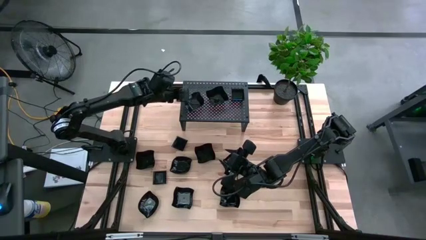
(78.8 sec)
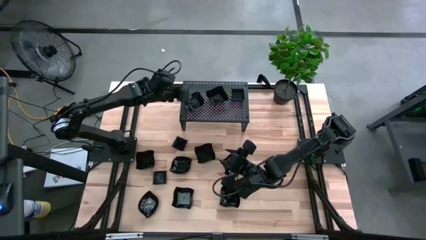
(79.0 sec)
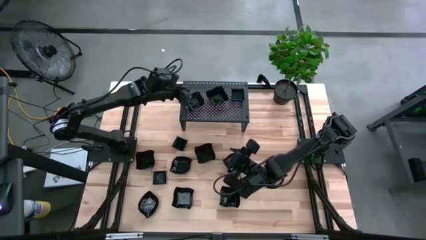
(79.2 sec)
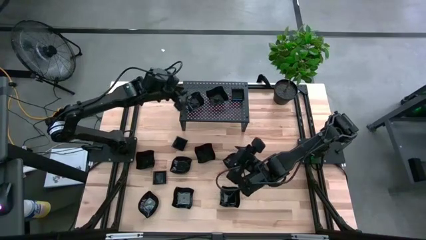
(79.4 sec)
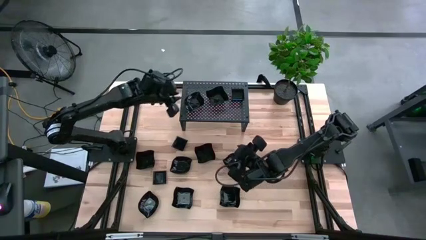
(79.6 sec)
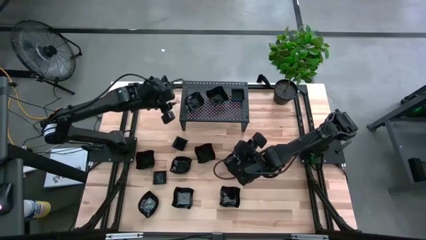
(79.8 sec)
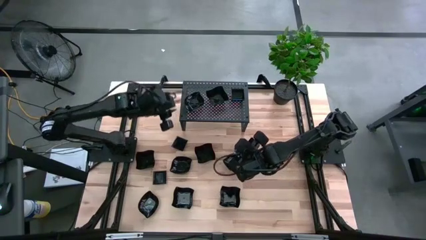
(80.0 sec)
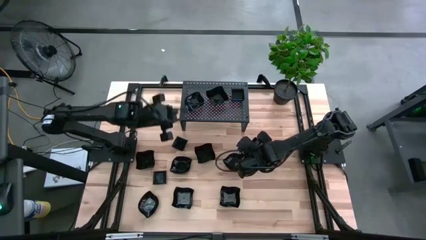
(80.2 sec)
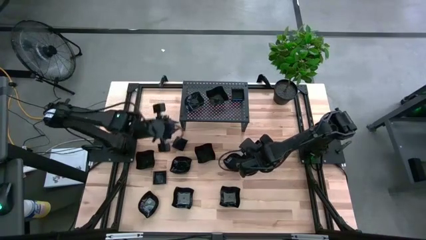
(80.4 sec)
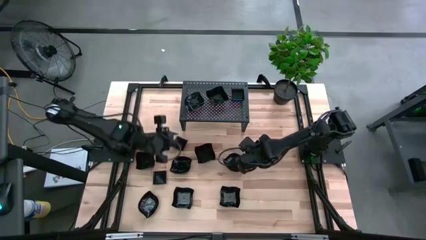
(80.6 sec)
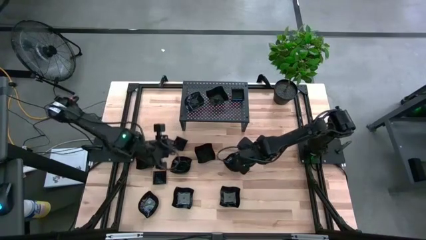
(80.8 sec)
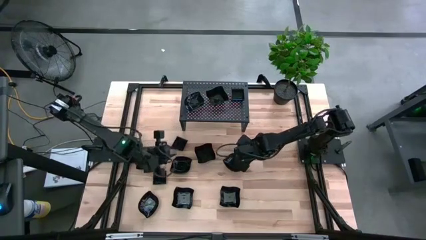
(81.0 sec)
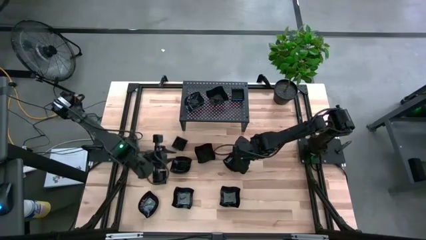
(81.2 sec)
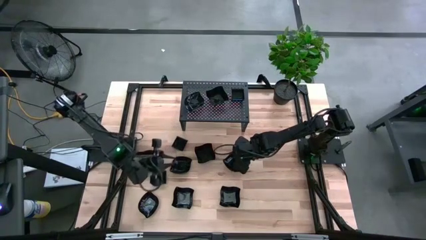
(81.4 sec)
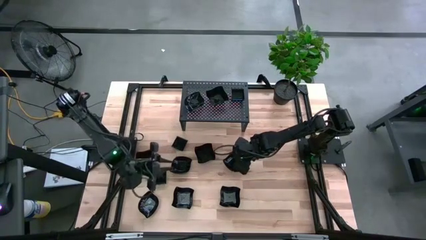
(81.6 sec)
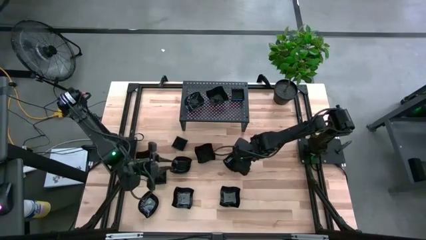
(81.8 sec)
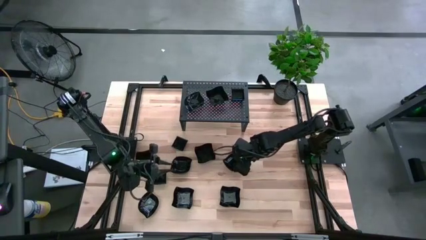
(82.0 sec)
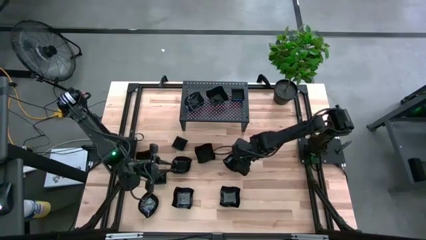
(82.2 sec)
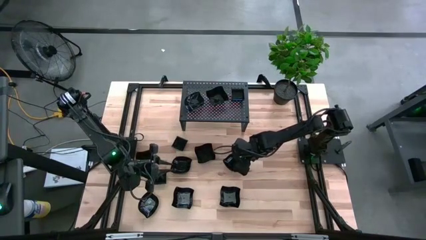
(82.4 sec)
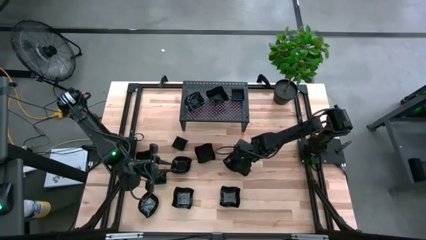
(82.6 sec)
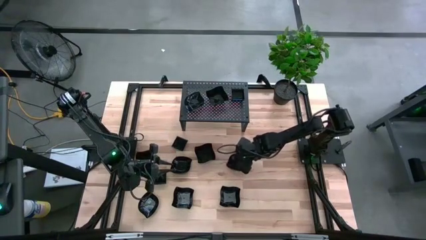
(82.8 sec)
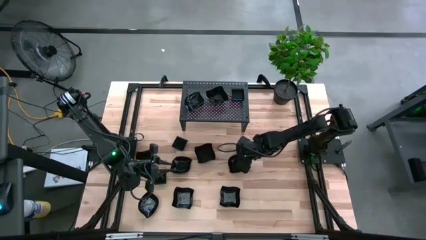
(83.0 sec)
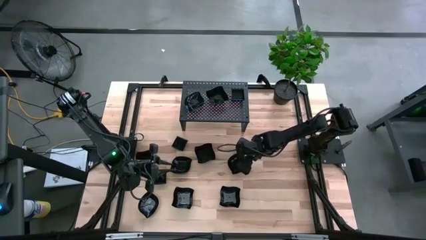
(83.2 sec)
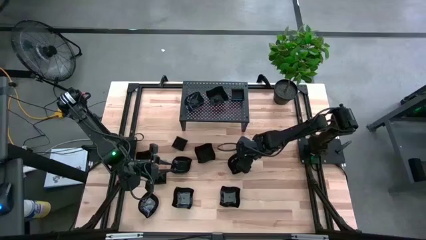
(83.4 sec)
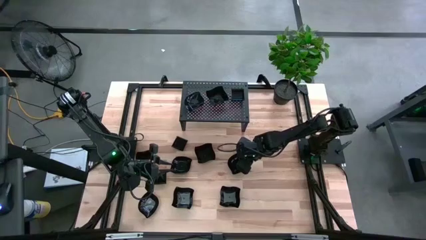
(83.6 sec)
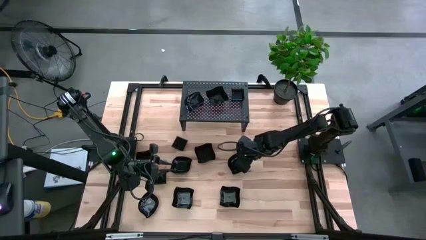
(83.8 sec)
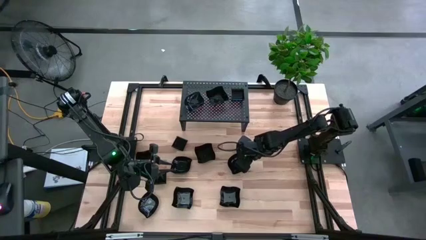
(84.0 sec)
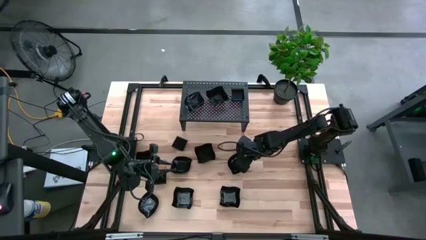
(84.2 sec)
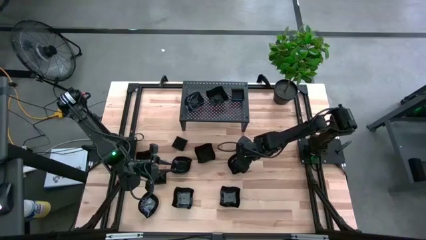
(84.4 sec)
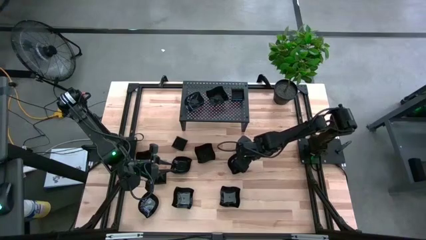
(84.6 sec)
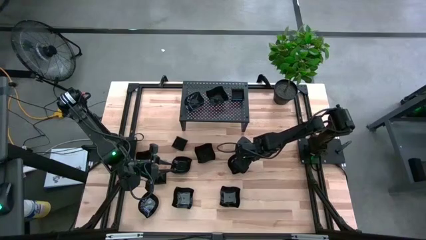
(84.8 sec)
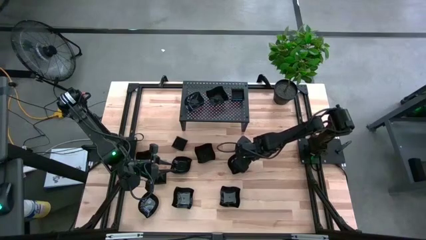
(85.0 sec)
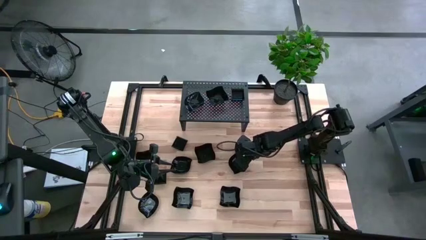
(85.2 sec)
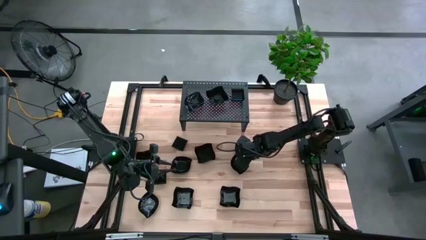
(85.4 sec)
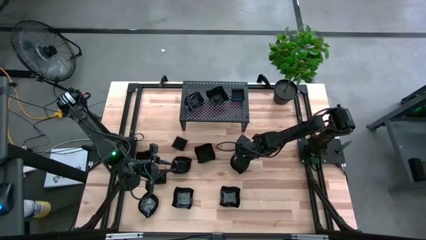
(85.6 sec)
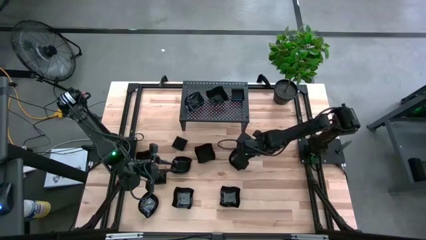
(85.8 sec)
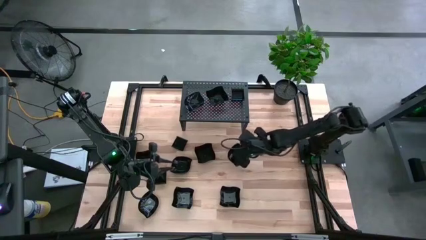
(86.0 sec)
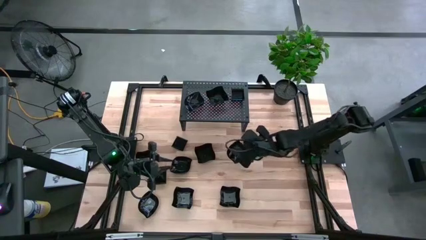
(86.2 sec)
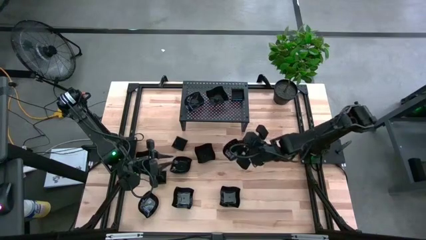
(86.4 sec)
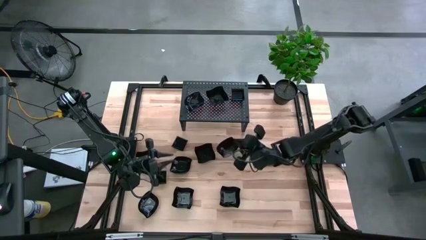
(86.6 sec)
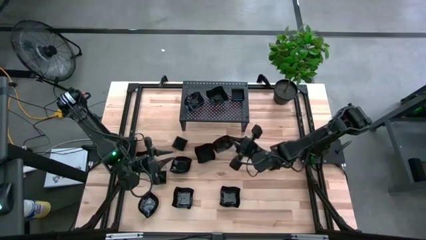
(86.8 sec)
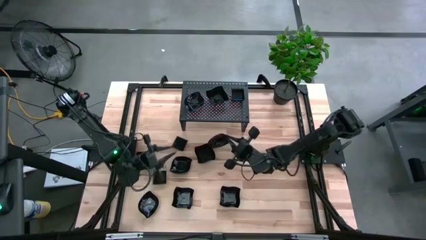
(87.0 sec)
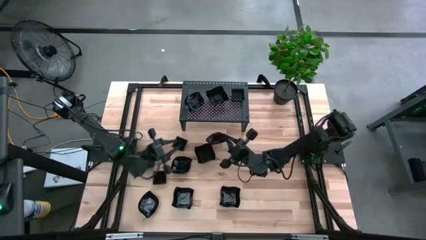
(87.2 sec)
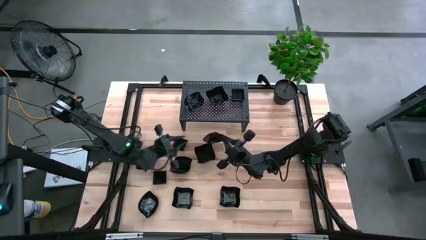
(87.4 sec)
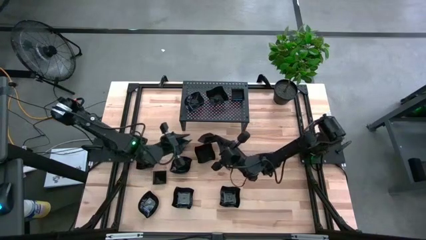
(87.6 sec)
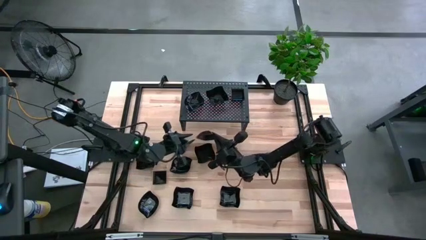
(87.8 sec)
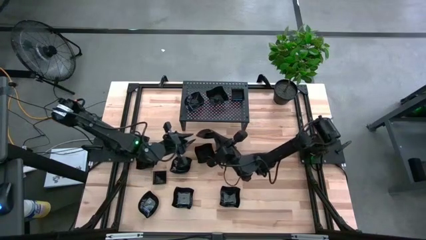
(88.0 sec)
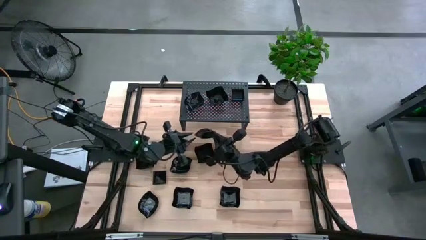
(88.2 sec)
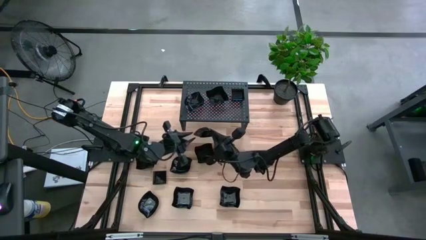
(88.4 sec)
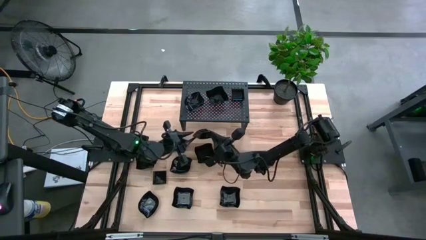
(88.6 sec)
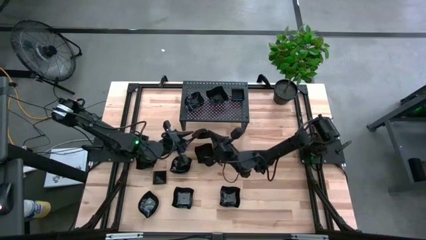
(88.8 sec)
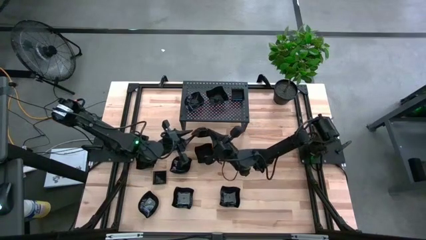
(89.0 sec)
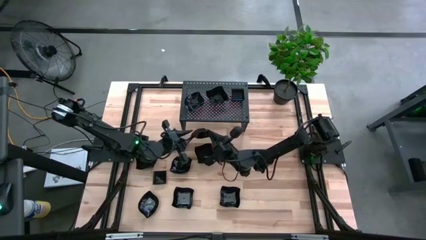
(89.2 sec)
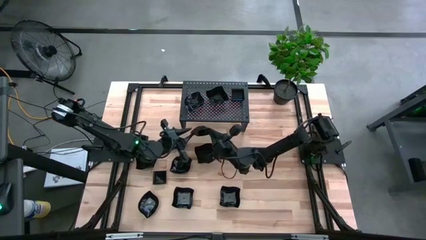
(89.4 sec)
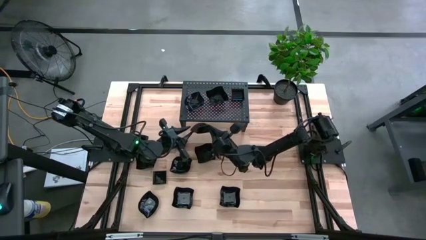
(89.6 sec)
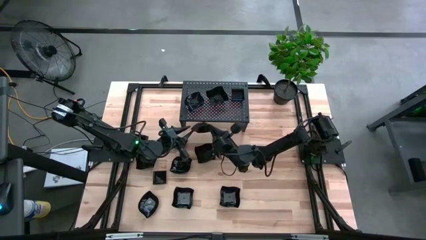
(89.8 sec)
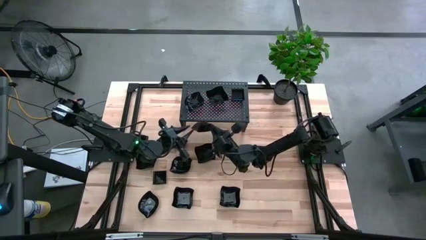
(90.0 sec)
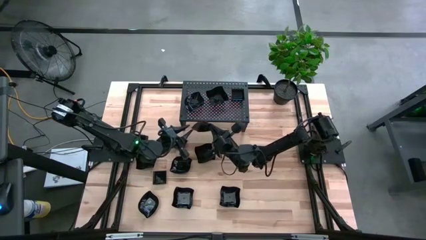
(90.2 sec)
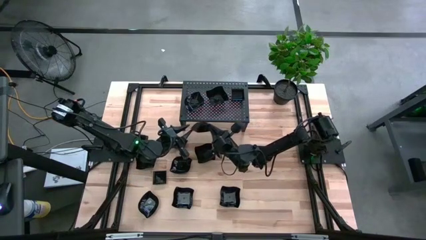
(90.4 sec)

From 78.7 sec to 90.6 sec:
Task: Pick & Place Mini shaped plates
Stack the leaf shaped plate on top of the leaf shaped plate on the shelf
